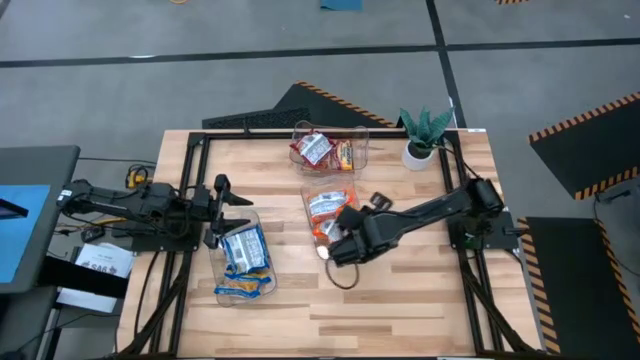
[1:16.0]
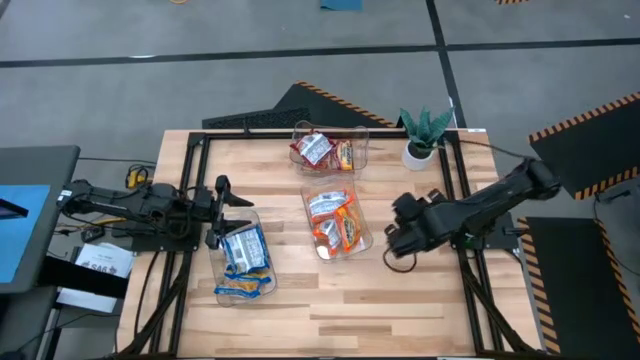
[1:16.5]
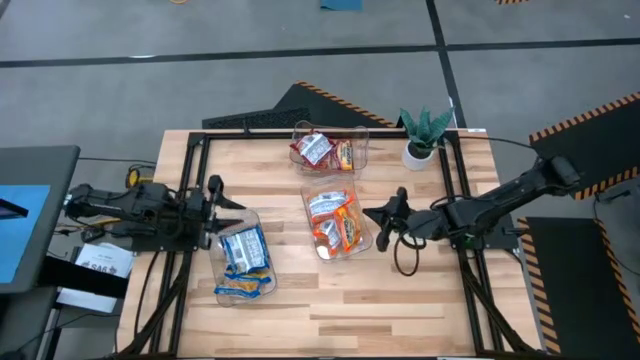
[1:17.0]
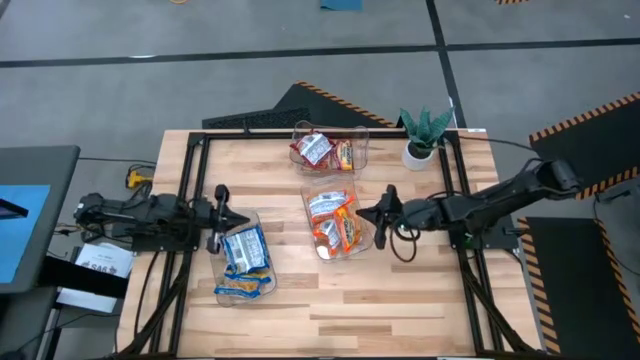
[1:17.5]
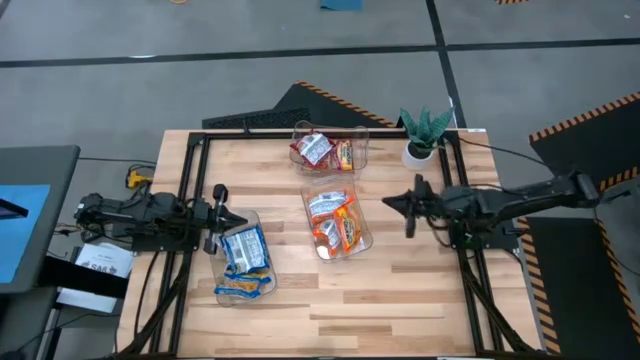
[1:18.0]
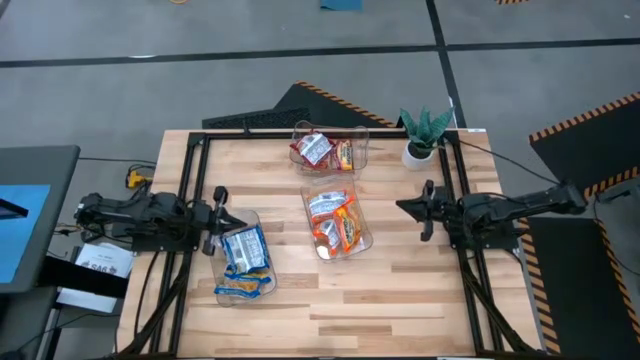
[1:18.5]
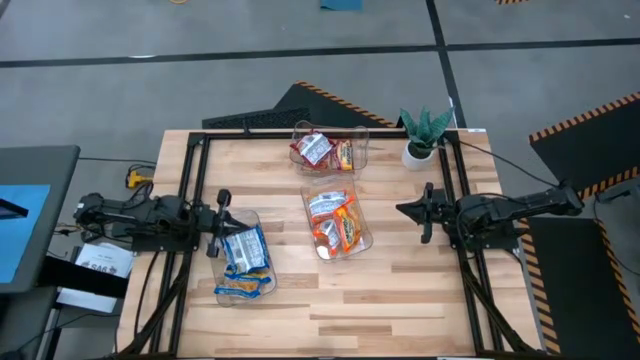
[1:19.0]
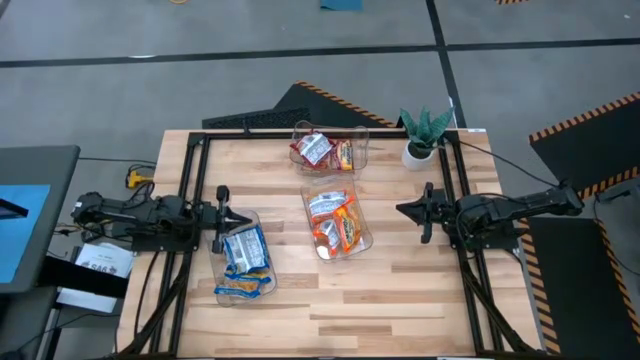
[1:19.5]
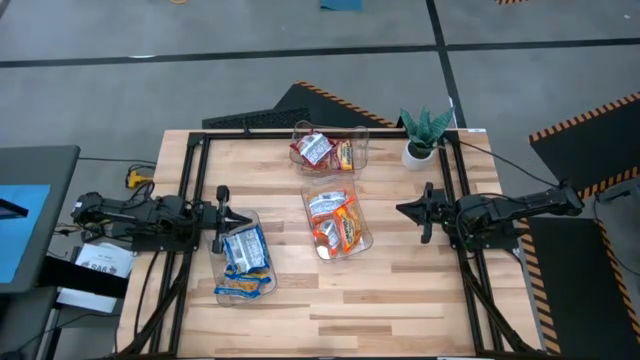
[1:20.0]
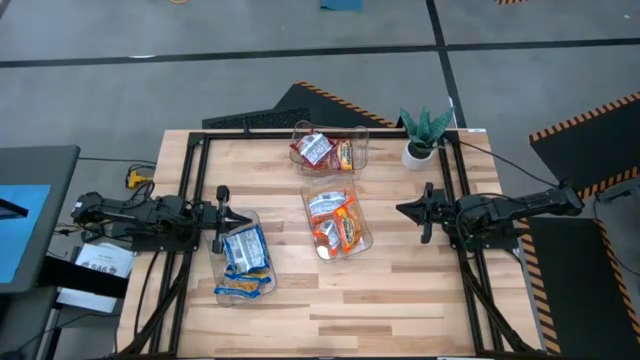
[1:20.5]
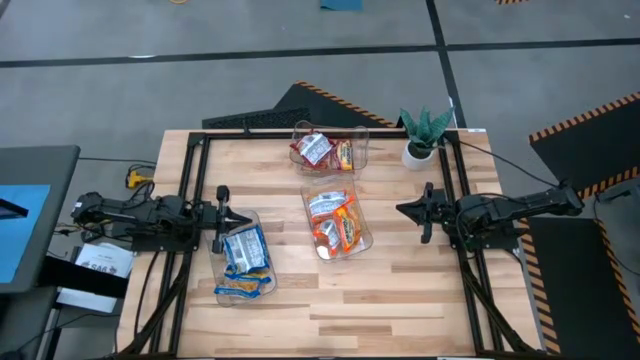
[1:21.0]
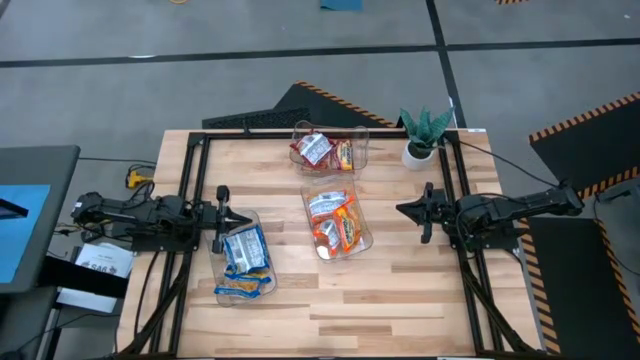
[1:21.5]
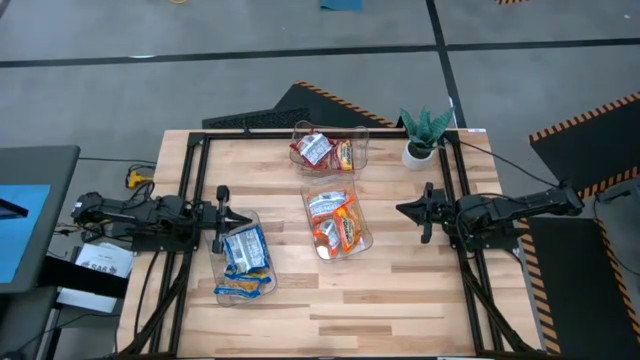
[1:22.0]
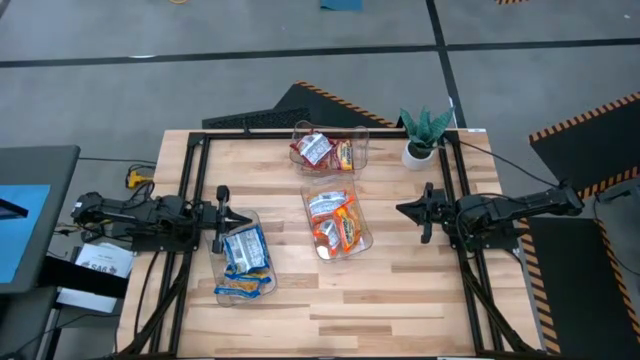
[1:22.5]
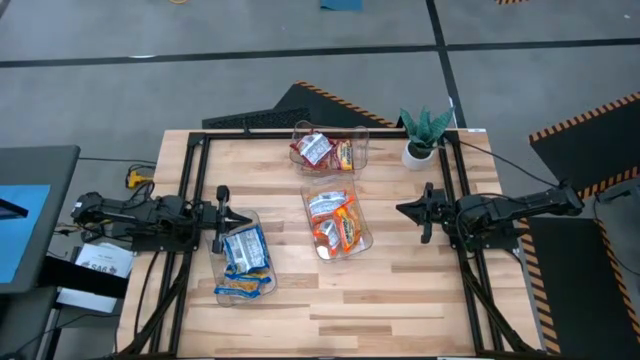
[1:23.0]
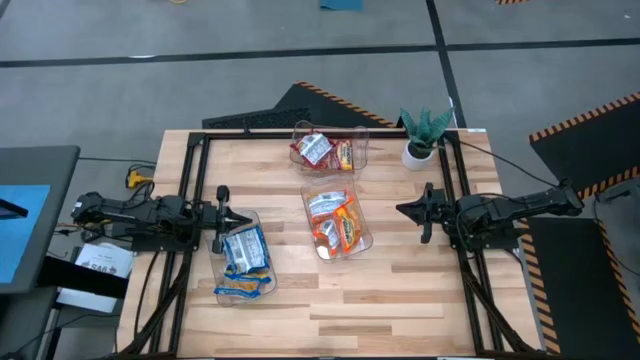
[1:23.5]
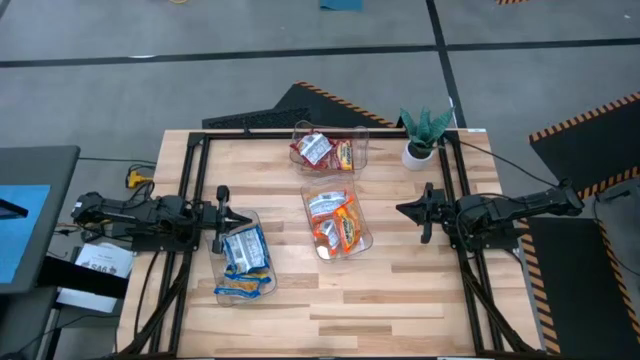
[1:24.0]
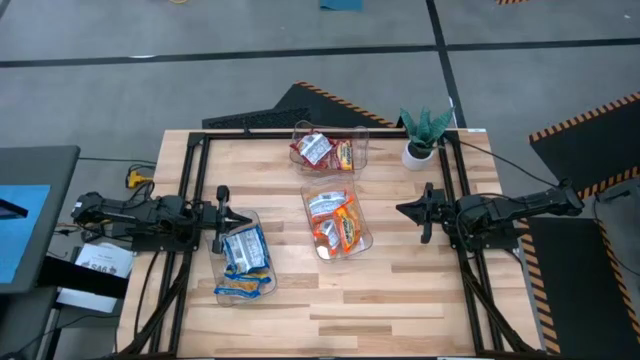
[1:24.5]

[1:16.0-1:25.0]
Task: Sort Maruchan noodles
Return to Home Position

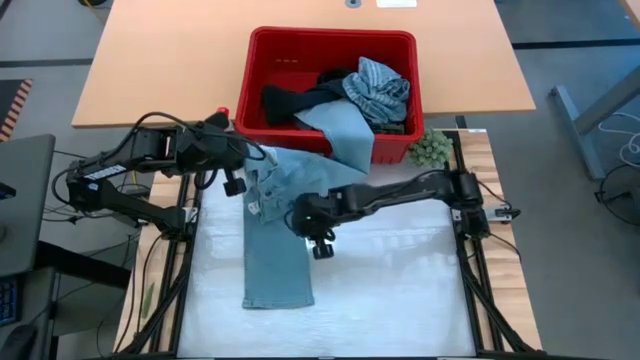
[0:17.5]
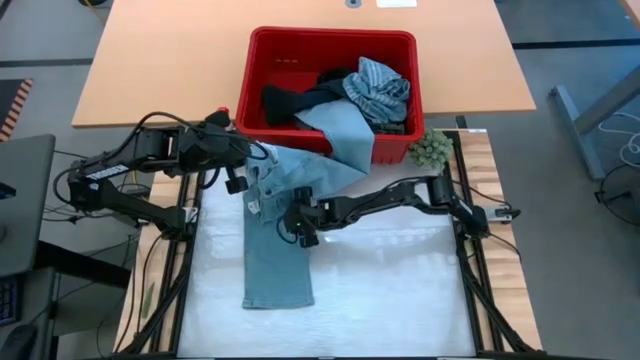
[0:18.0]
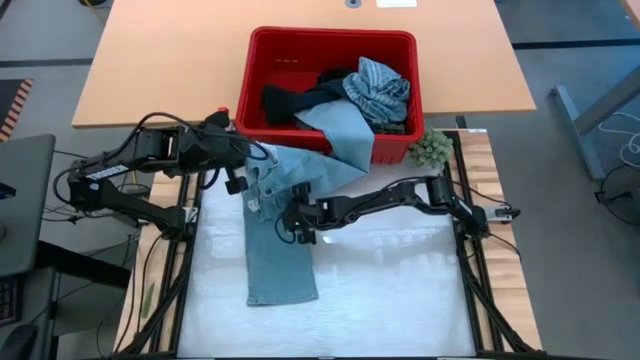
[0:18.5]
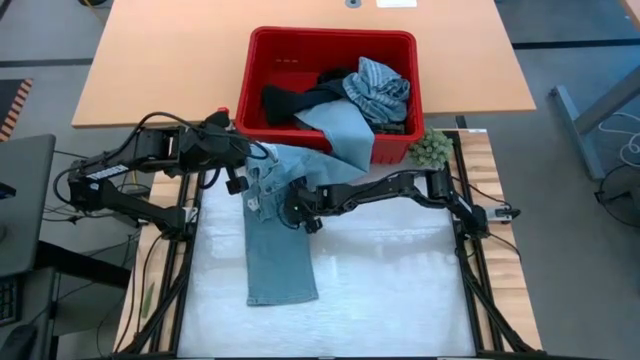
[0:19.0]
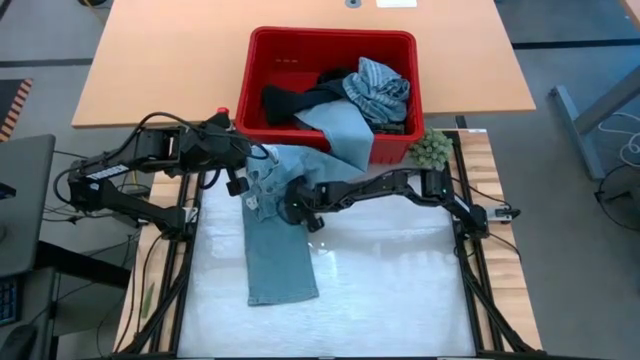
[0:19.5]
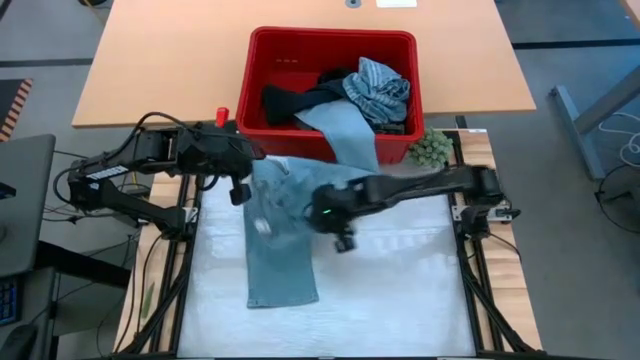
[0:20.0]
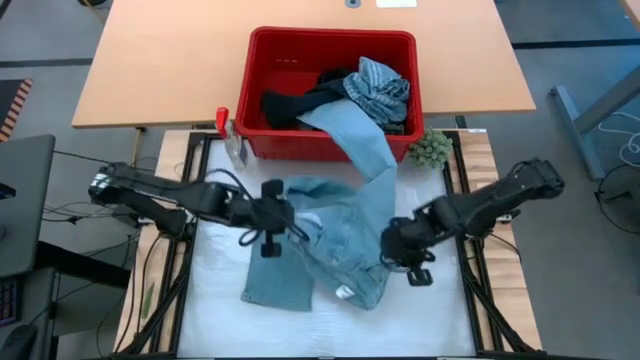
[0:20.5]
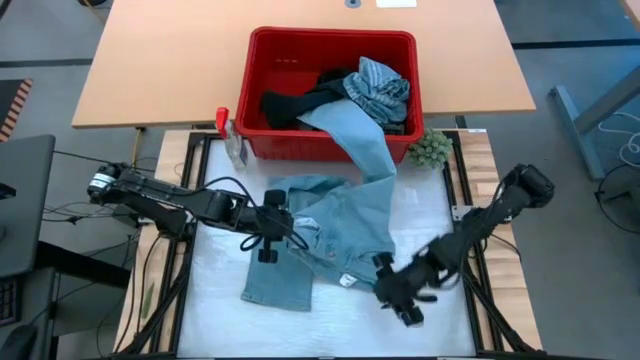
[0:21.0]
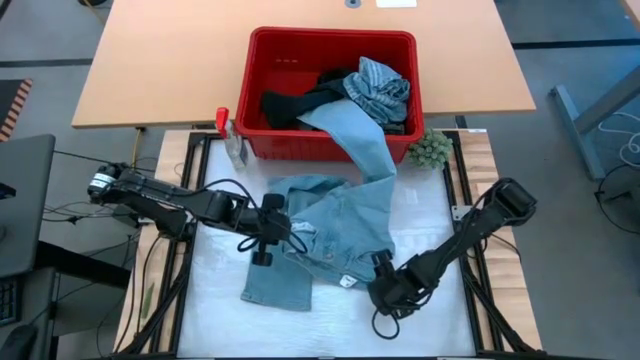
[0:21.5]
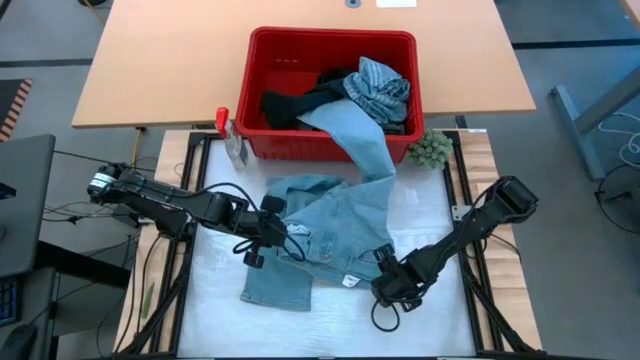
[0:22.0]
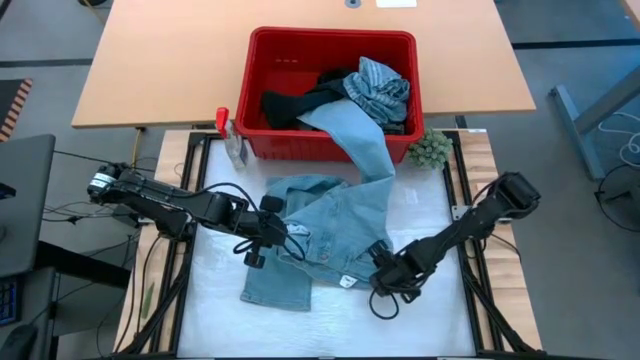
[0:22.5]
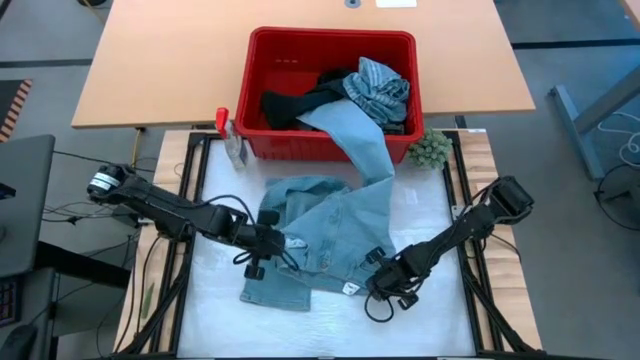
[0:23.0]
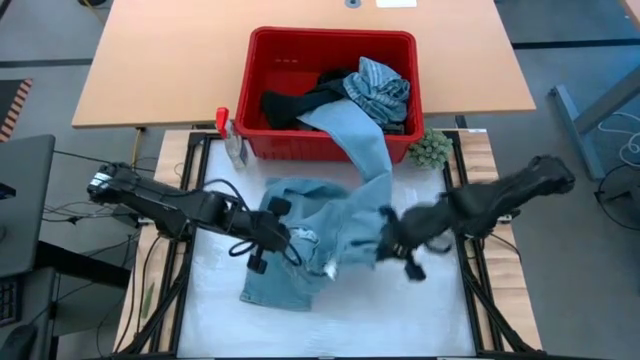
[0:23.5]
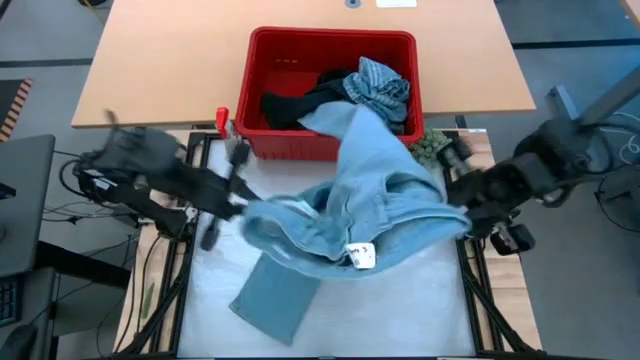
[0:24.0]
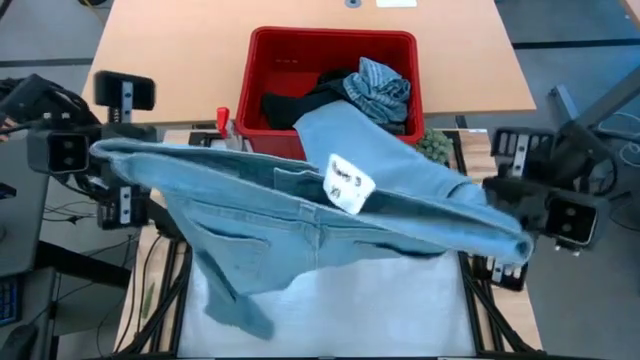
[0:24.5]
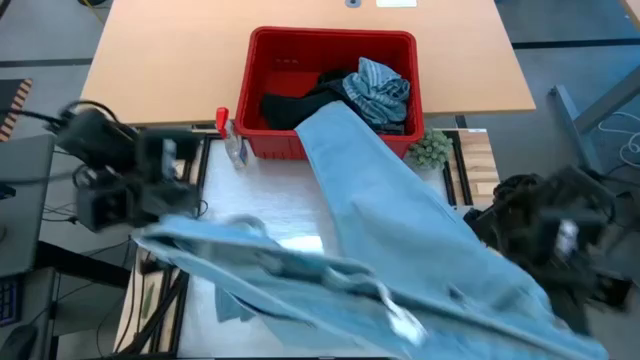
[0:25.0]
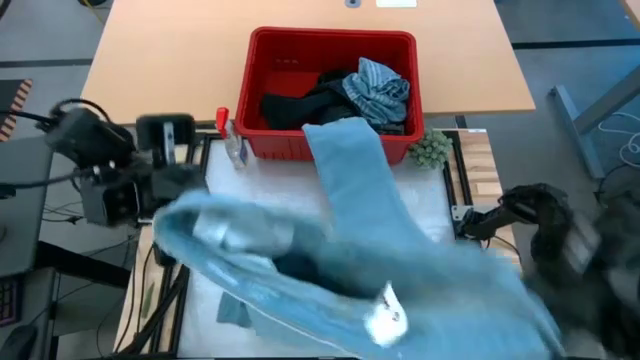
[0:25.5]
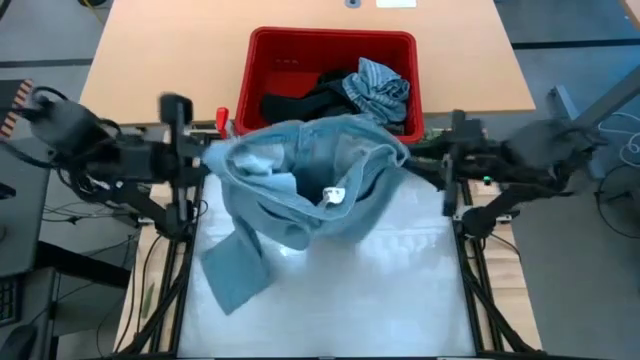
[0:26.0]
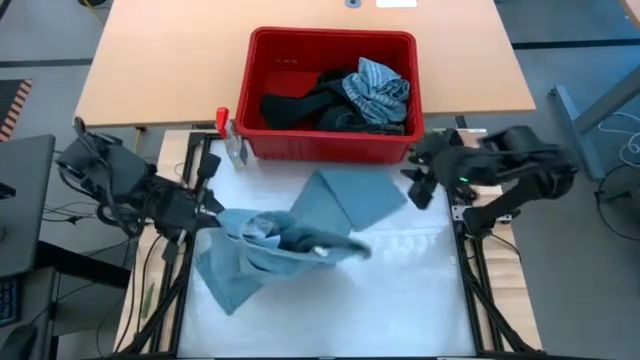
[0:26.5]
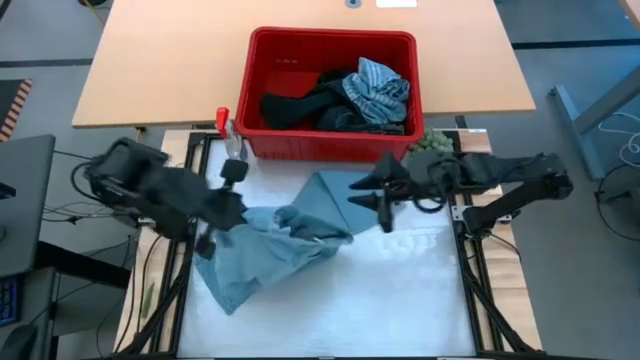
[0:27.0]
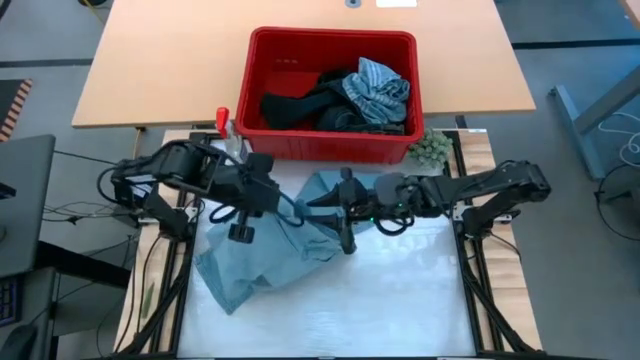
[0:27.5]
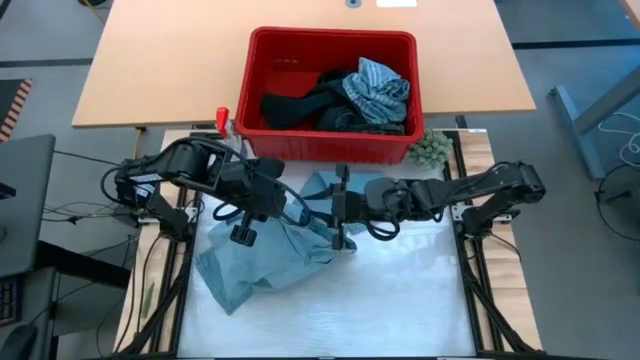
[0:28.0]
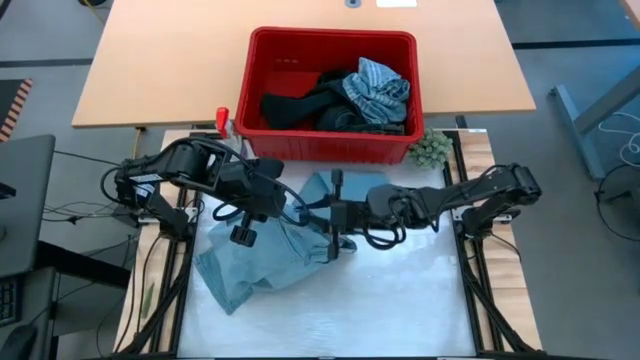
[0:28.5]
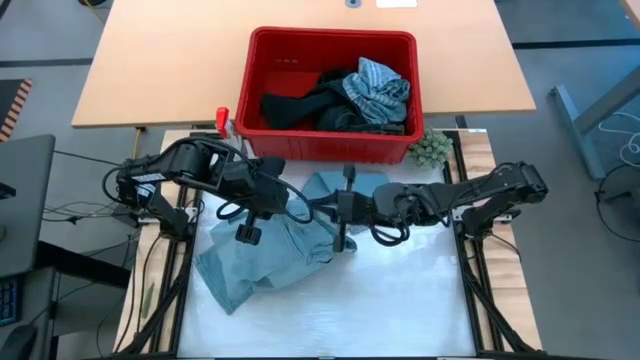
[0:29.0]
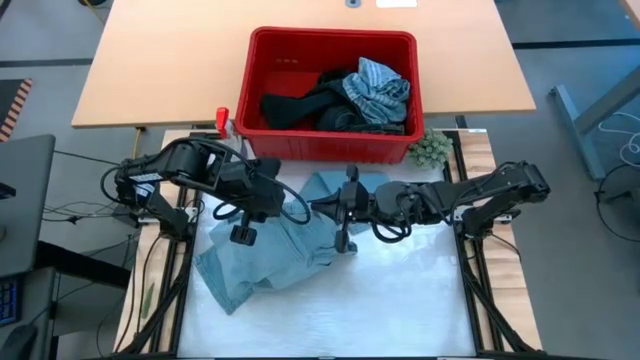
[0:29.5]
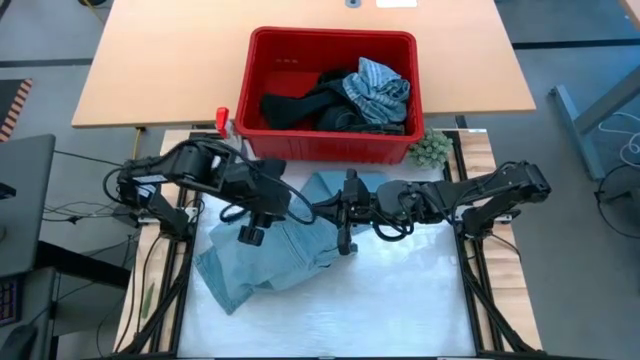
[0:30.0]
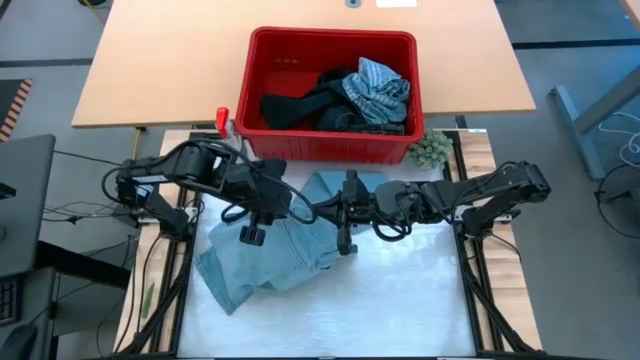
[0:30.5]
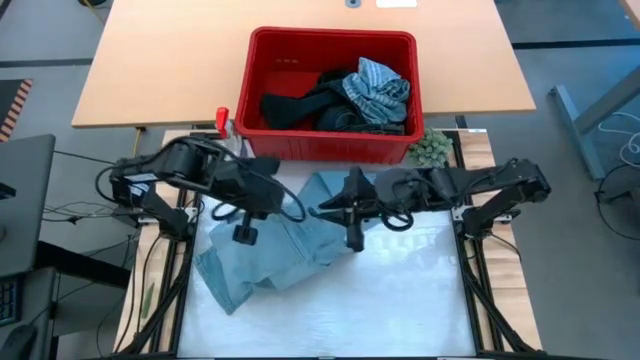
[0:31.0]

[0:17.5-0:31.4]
Task: Fold laundry
Fold the blue pants from the red laundry bin
